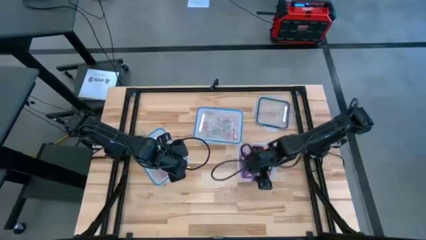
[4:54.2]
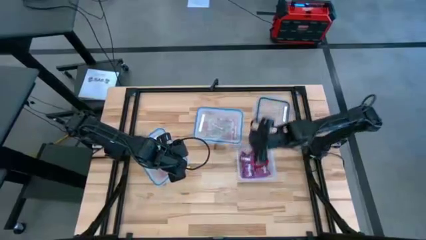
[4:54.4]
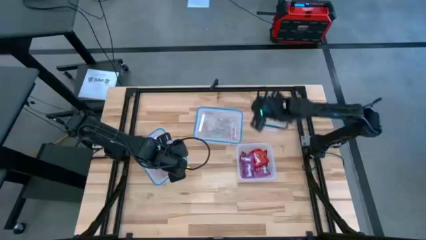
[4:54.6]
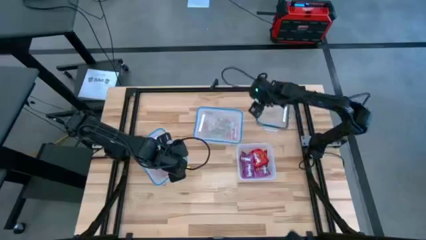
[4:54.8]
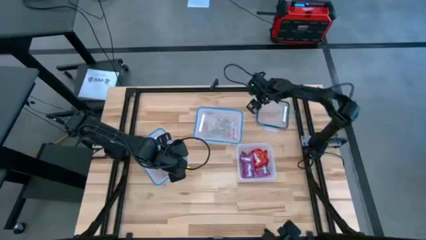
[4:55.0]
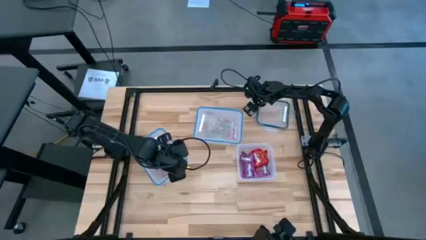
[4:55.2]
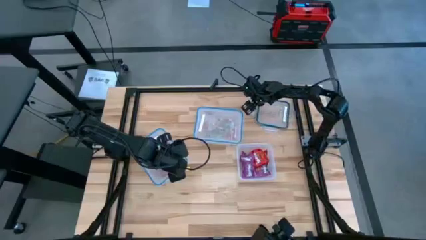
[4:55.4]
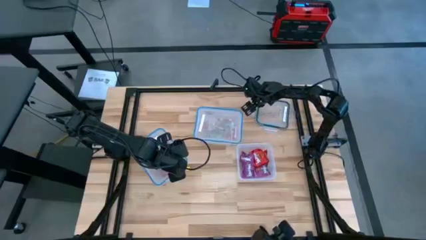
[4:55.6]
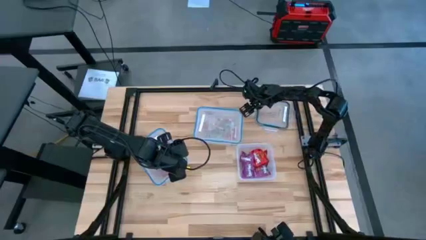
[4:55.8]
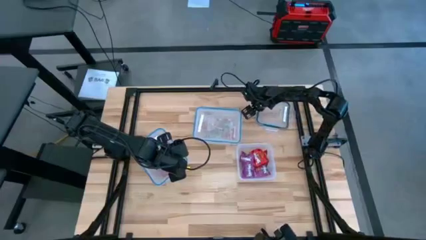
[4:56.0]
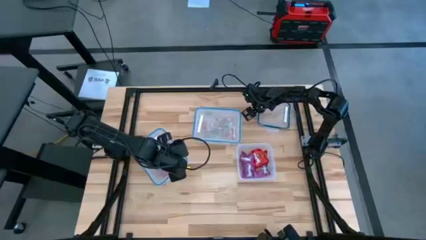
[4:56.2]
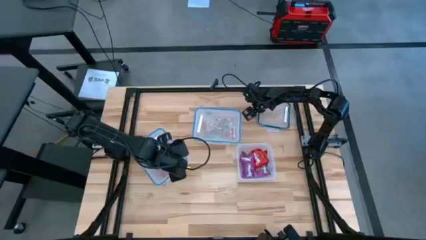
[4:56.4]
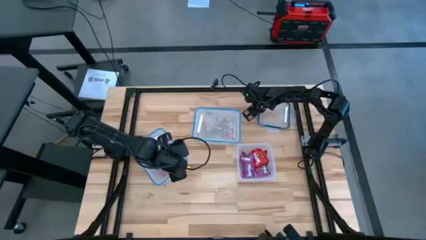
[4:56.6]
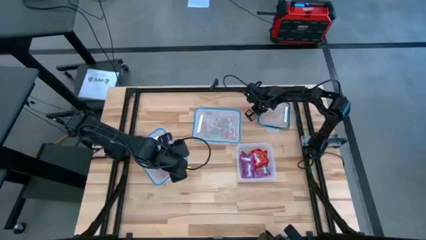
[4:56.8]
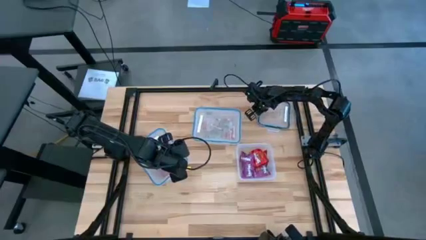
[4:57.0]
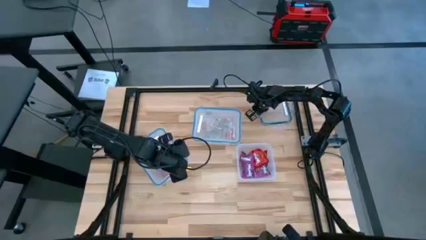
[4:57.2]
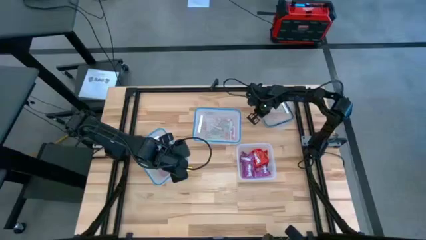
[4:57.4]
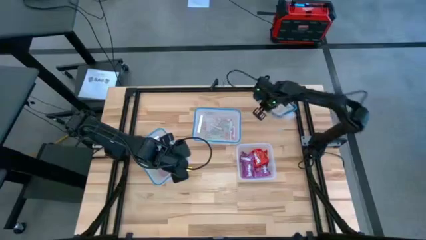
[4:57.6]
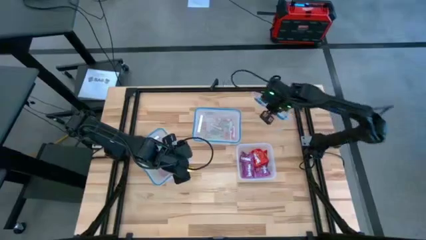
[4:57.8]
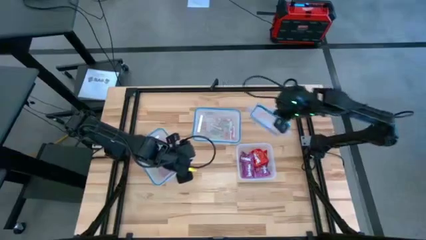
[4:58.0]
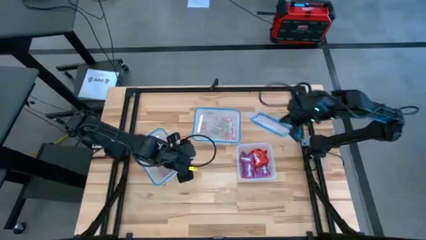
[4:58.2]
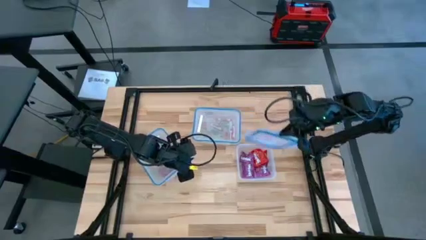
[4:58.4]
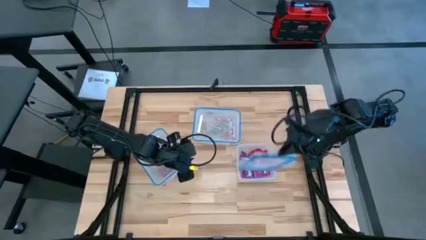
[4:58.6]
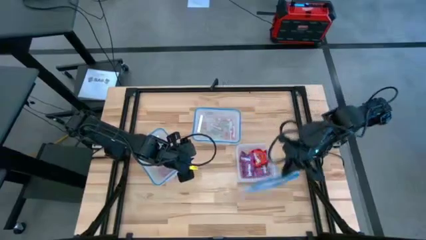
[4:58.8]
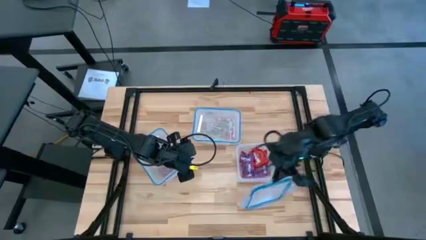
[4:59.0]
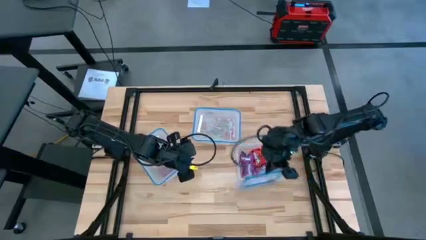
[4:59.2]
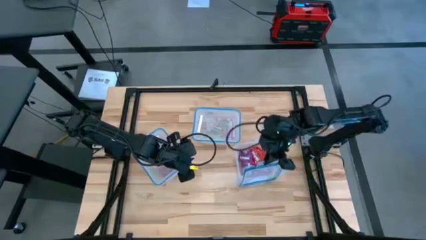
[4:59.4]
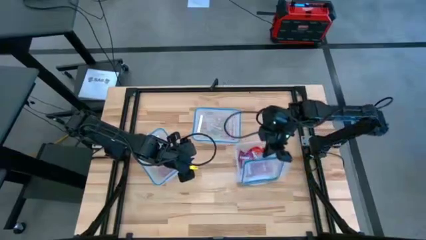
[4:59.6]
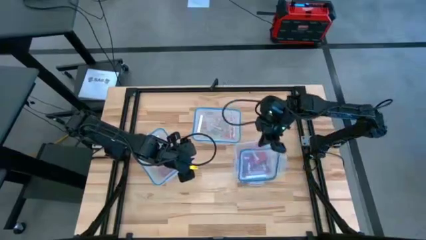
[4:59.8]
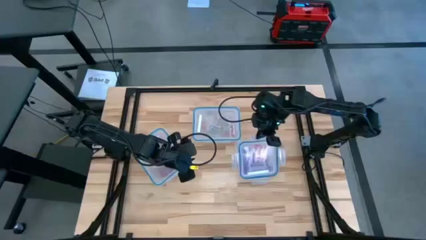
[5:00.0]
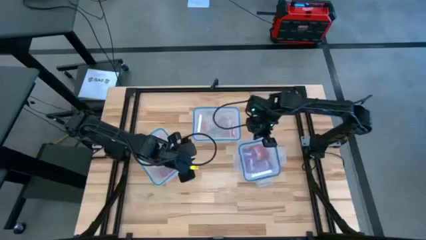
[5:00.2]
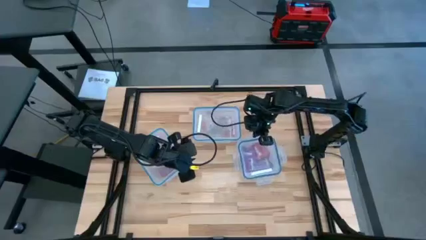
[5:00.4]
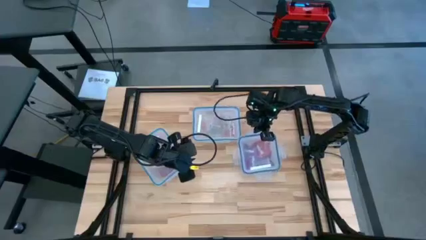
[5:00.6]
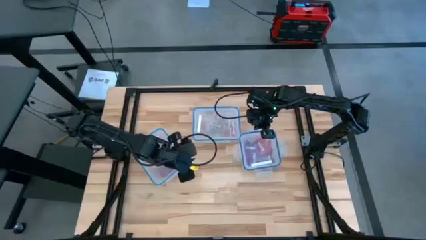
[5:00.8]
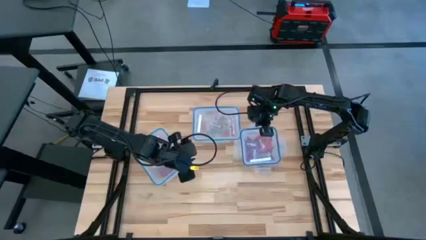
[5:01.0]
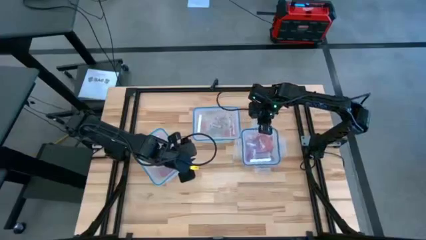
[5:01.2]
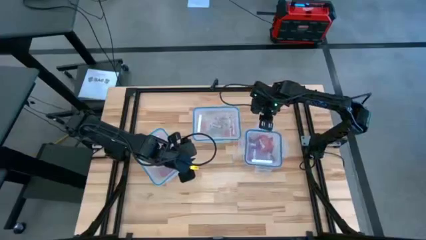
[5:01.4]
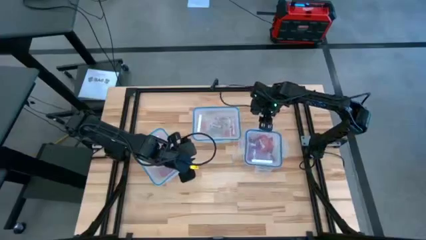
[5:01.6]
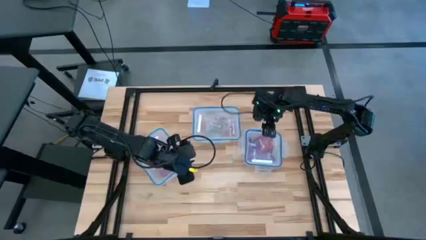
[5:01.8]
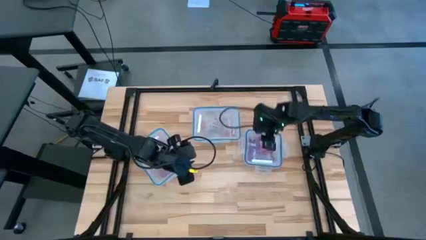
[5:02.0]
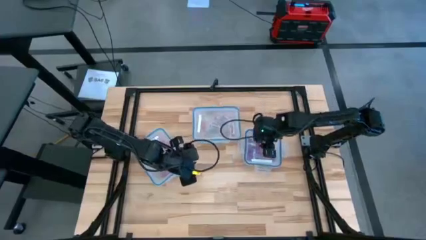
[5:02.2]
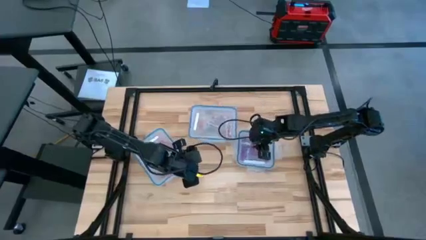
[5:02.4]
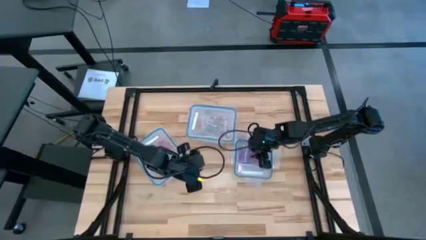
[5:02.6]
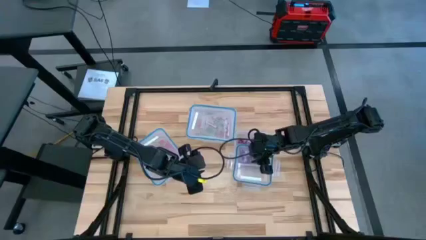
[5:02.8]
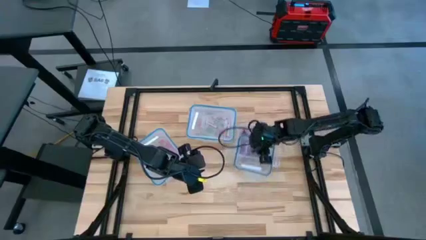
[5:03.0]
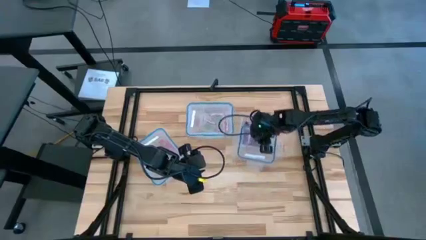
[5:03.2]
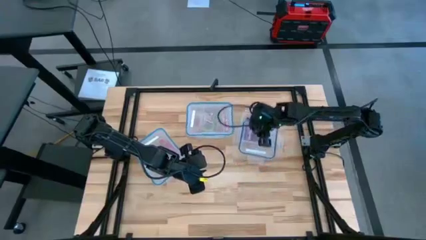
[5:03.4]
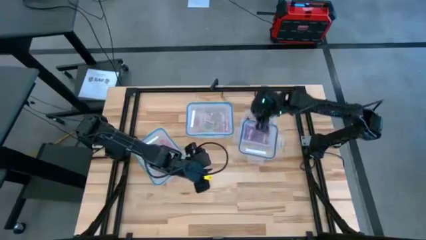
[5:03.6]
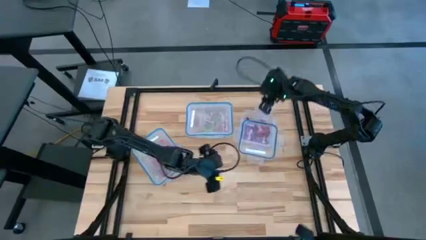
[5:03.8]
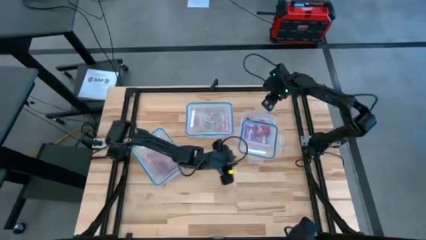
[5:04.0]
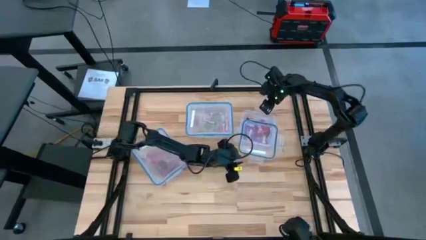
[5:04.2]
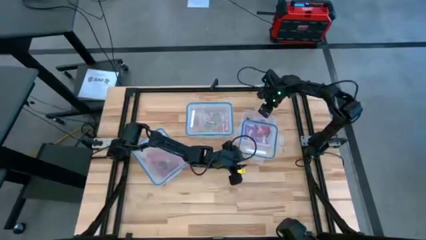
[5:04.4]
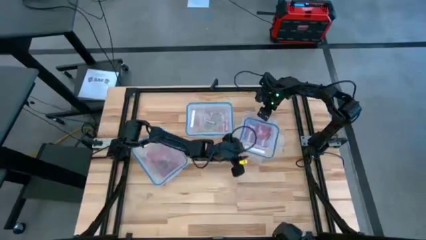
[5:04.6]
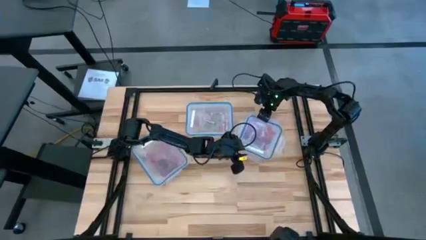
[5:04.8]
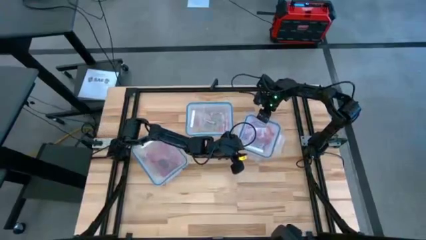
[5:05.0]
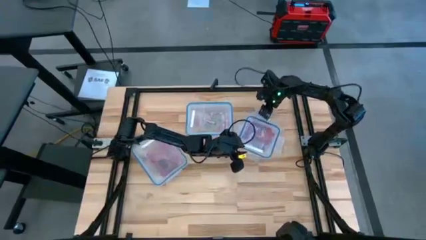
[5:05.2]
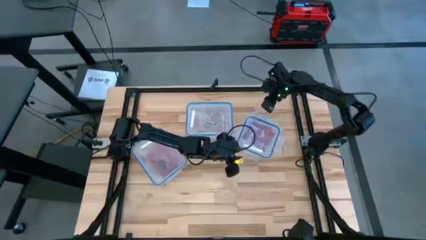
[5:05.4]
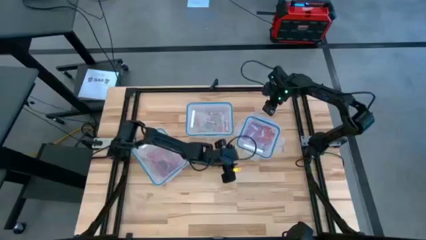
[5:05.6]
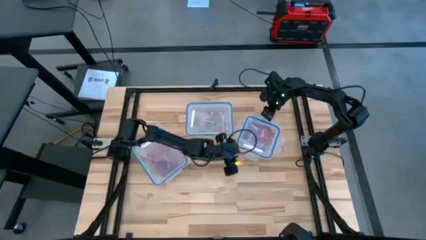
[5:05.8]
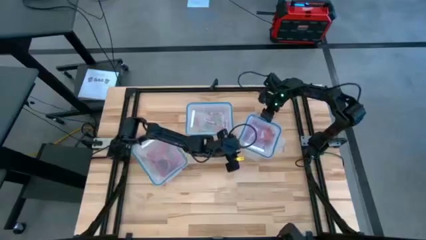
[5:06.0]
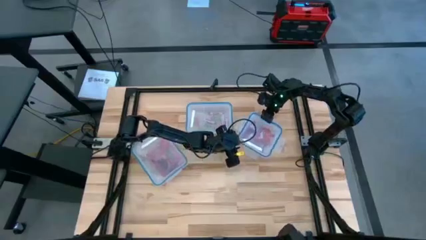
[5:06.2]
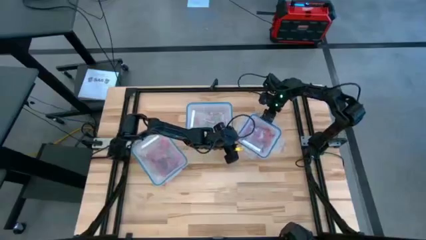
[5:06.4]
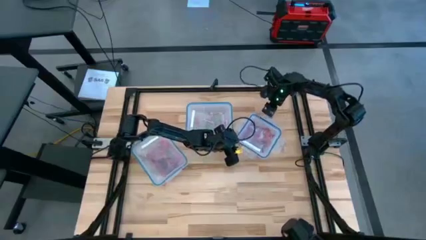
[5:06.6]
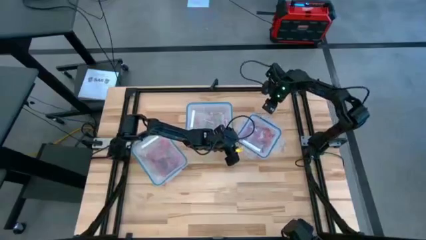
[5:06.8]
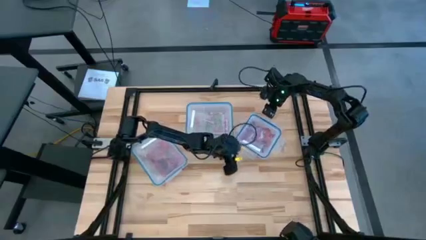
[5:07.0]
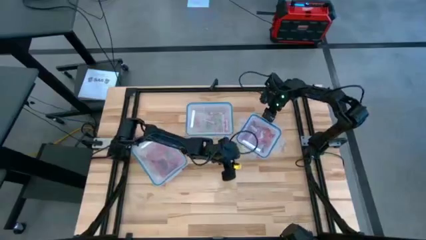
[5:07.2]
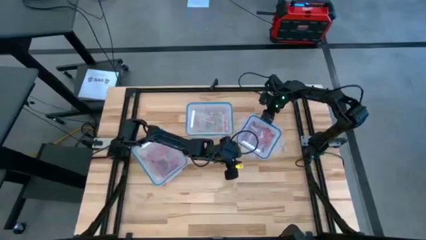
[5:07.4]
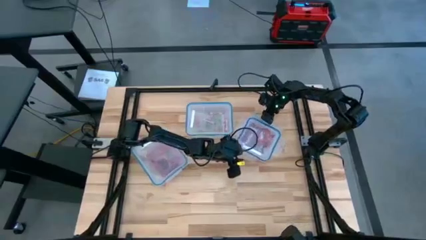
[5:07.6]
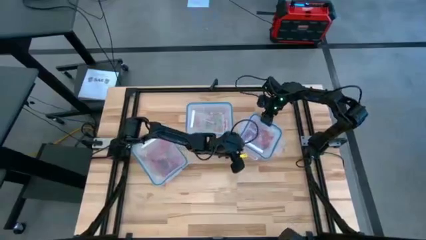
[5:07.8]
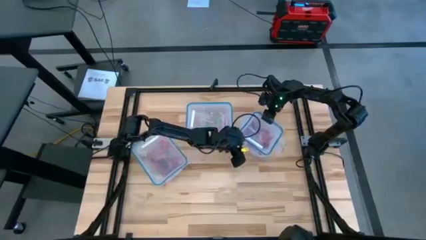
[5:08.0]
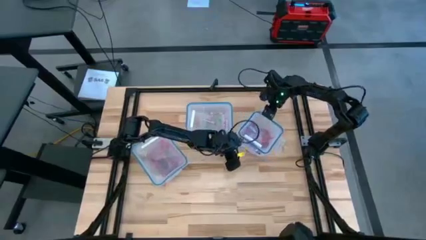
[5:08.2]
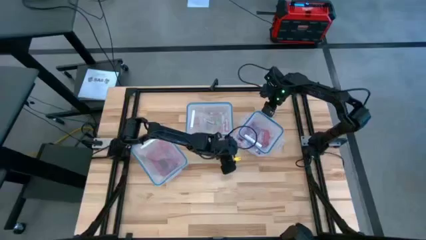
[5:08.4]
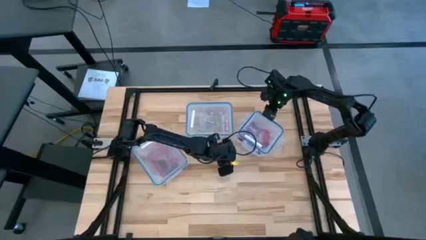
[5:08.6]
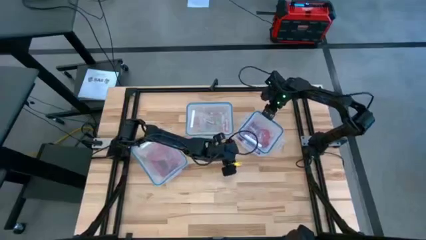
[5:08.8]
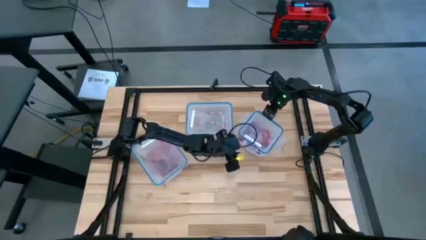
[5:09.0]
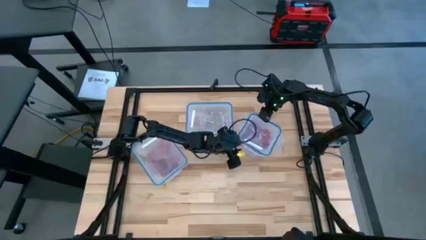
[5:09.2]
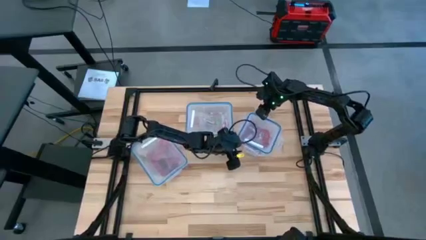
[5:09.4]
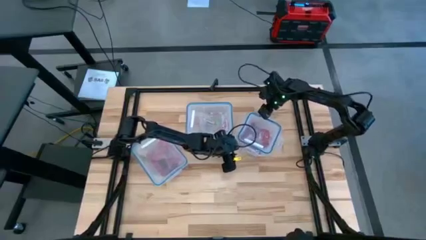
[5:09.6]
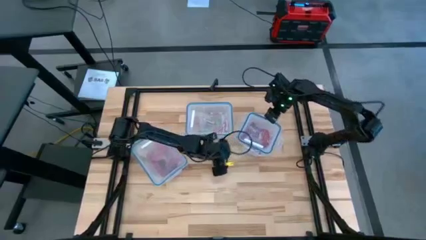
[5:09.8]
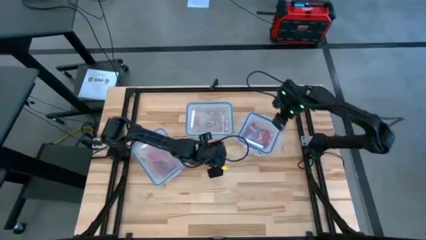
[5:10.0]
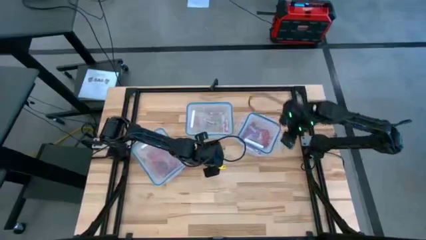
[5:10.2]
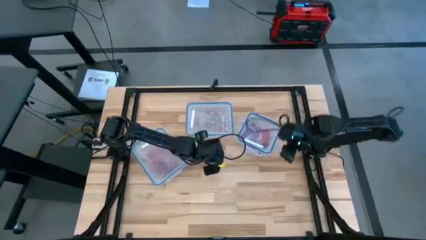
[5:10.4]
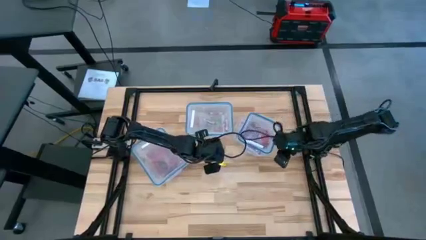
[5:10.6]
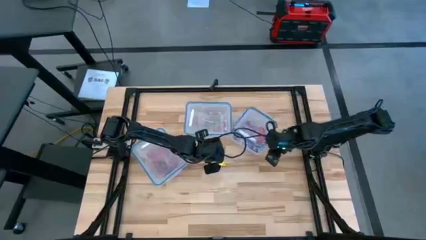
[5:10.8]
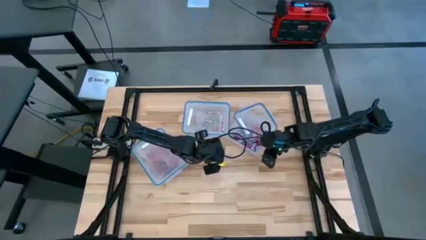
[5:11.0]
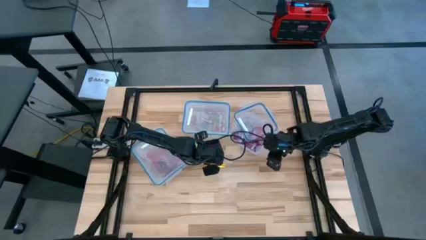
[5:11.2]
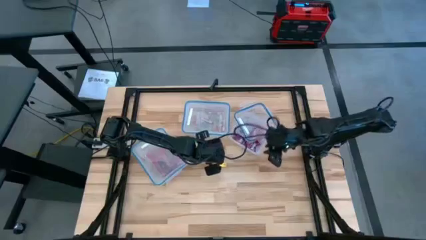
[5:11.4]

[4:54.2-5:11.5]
Task: Sort candy
Close the middle right transparent bin
